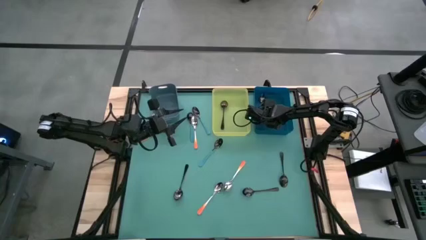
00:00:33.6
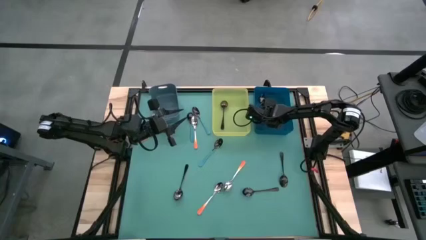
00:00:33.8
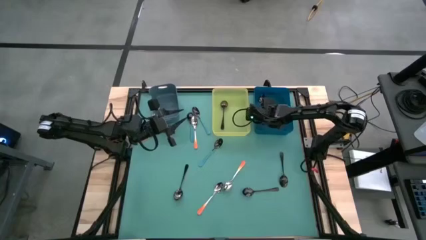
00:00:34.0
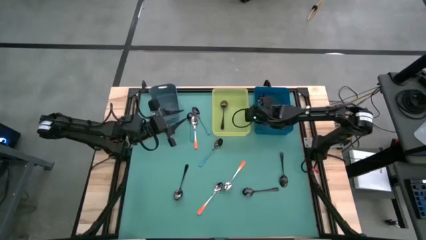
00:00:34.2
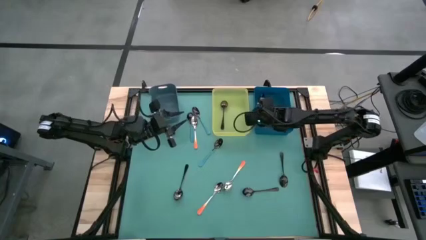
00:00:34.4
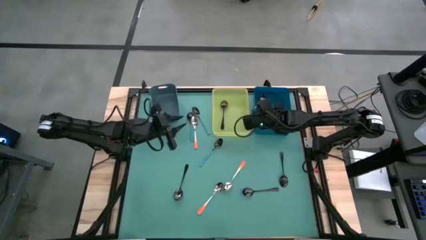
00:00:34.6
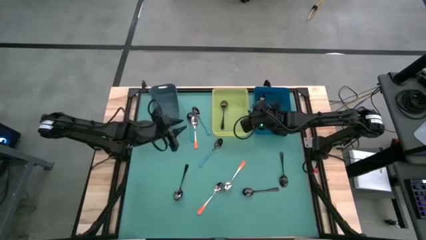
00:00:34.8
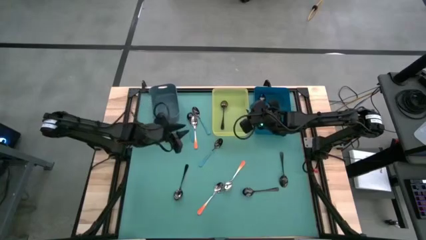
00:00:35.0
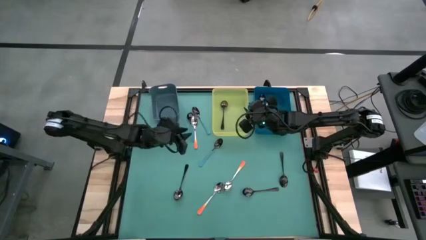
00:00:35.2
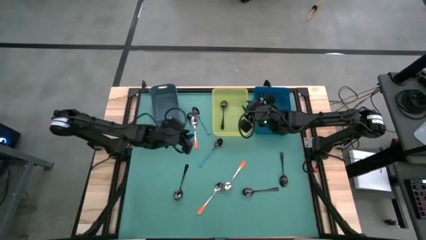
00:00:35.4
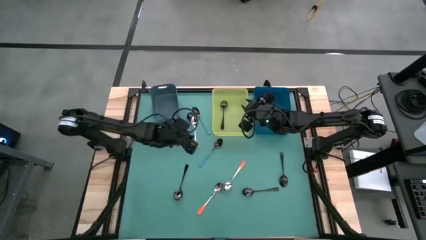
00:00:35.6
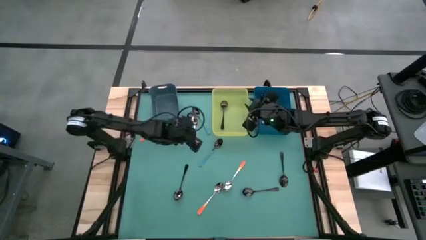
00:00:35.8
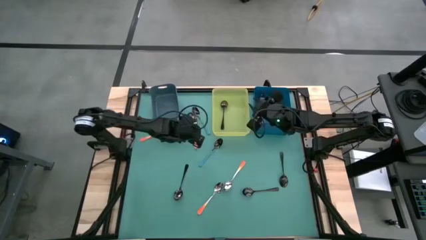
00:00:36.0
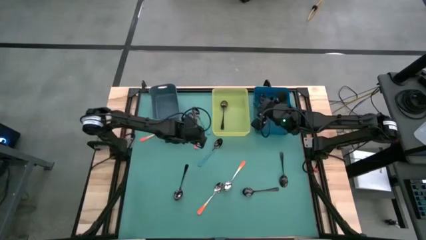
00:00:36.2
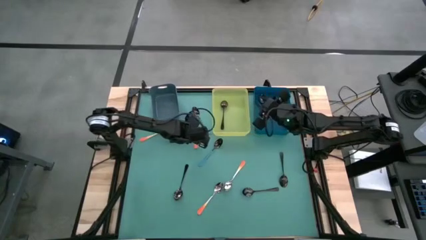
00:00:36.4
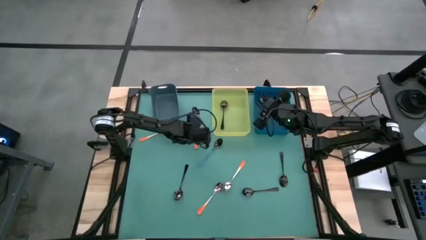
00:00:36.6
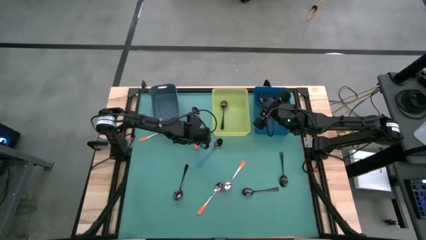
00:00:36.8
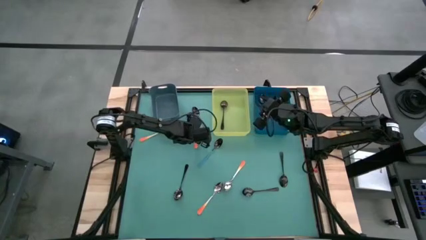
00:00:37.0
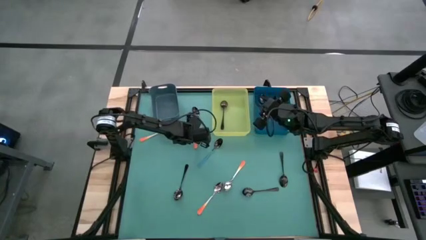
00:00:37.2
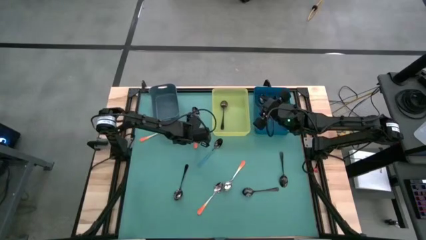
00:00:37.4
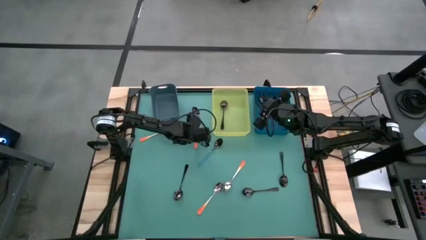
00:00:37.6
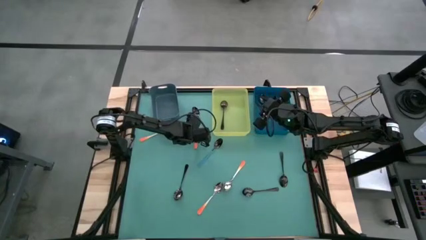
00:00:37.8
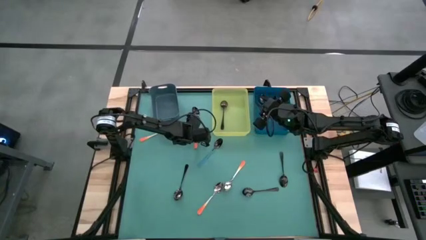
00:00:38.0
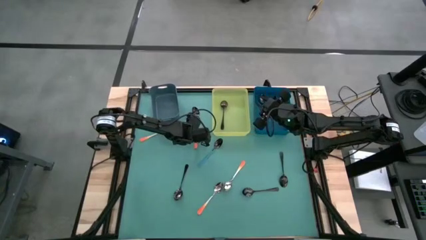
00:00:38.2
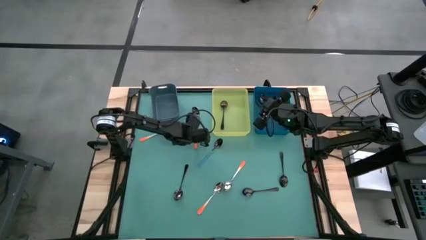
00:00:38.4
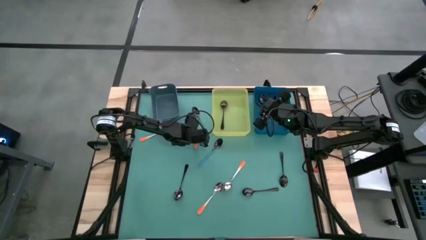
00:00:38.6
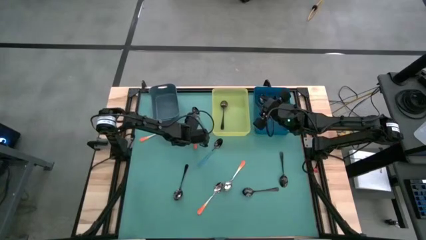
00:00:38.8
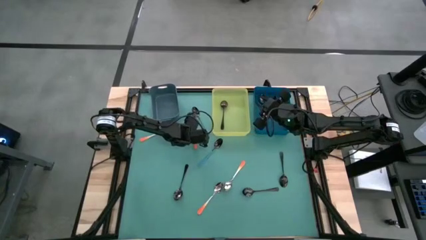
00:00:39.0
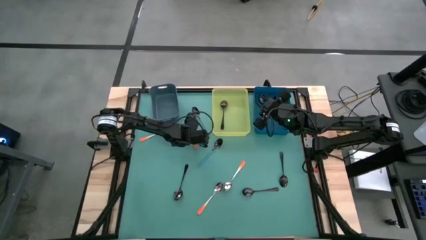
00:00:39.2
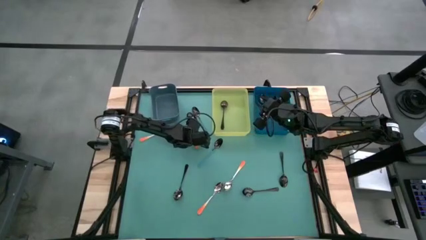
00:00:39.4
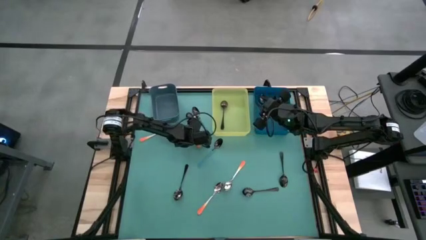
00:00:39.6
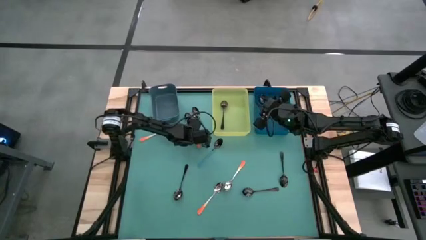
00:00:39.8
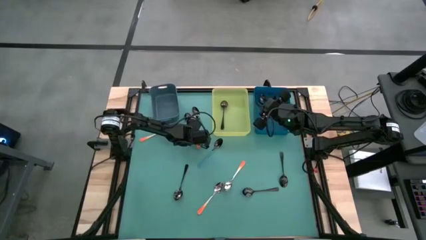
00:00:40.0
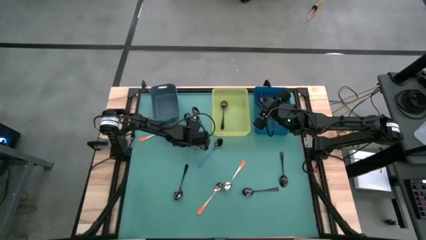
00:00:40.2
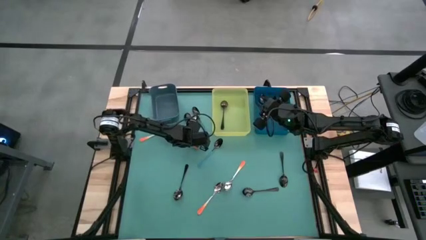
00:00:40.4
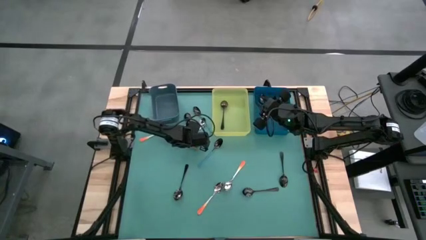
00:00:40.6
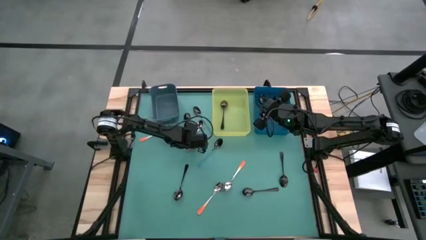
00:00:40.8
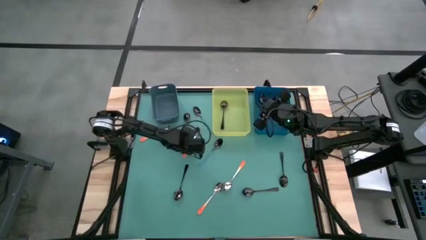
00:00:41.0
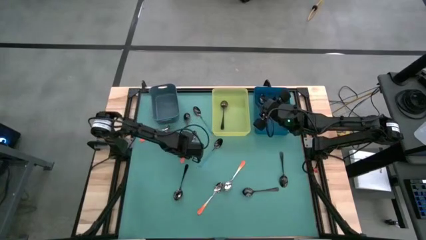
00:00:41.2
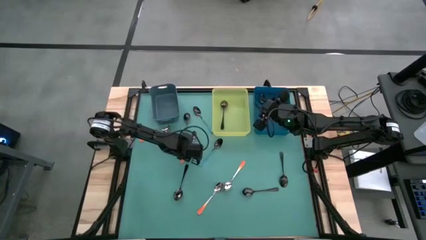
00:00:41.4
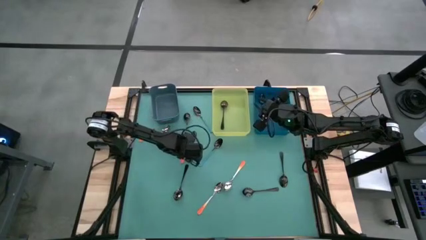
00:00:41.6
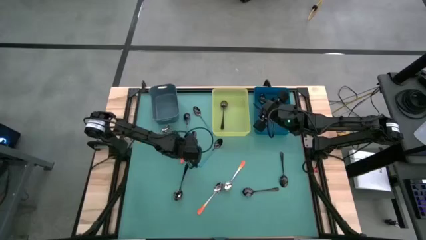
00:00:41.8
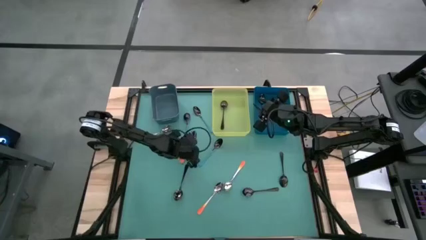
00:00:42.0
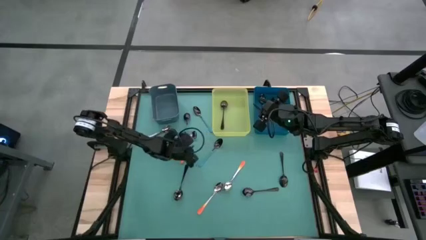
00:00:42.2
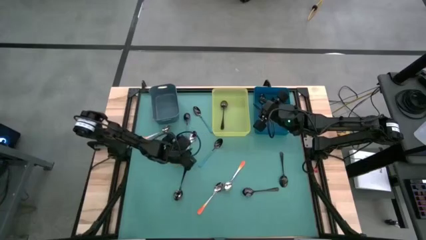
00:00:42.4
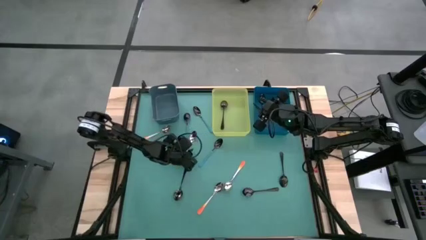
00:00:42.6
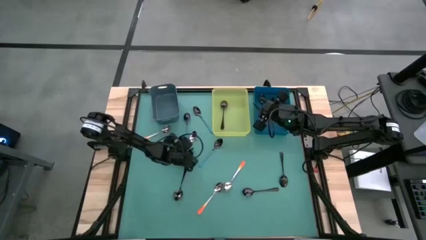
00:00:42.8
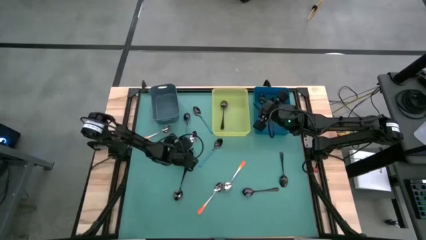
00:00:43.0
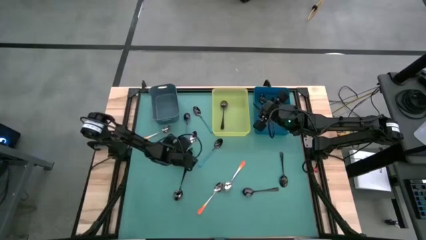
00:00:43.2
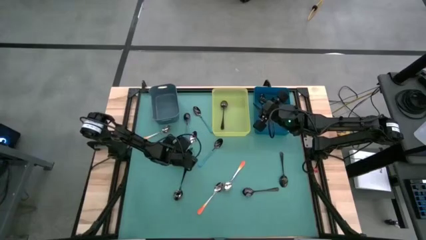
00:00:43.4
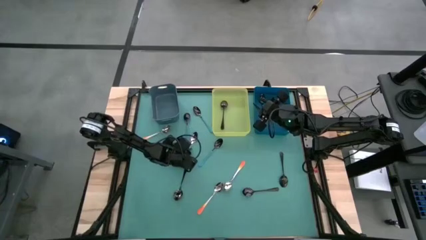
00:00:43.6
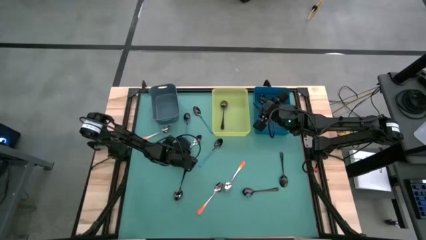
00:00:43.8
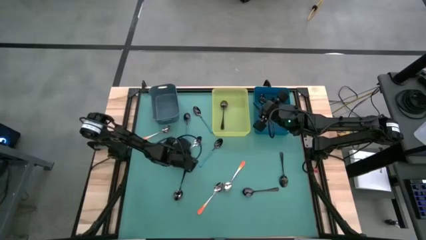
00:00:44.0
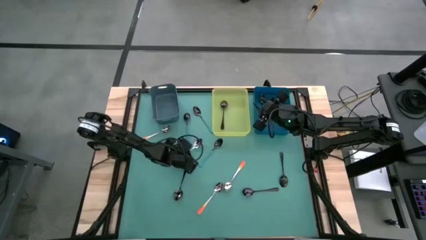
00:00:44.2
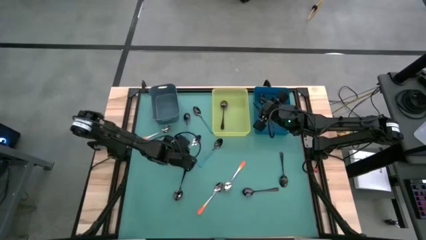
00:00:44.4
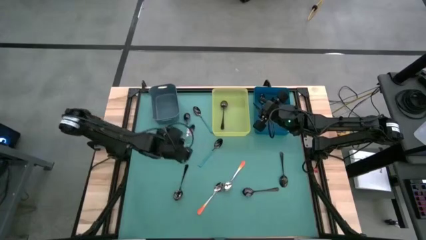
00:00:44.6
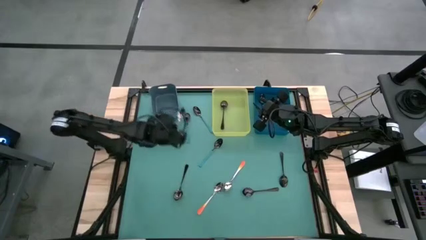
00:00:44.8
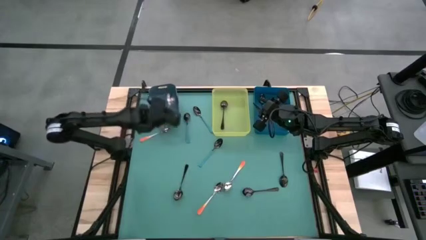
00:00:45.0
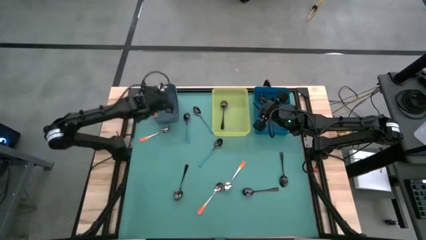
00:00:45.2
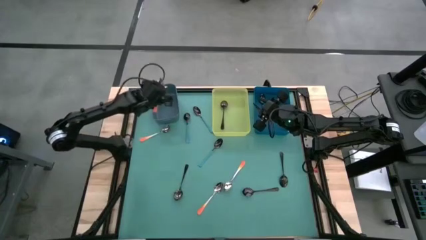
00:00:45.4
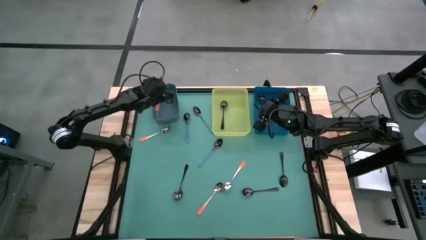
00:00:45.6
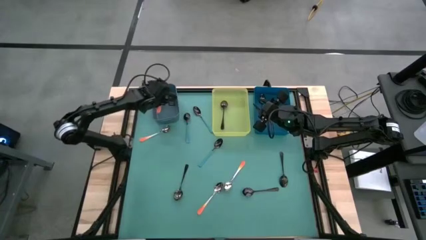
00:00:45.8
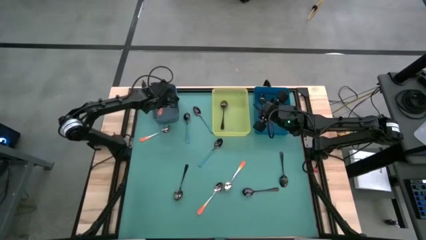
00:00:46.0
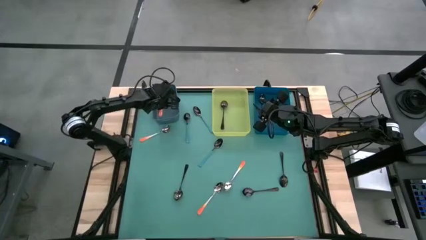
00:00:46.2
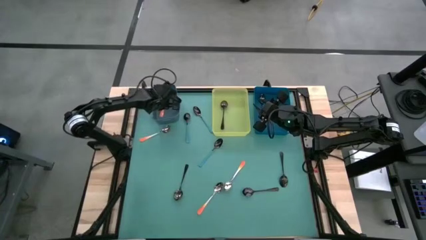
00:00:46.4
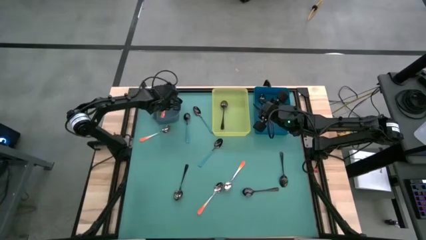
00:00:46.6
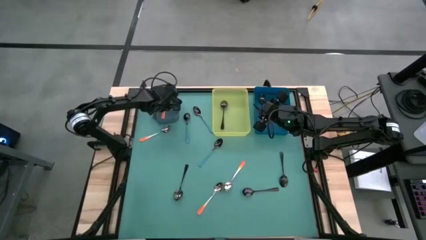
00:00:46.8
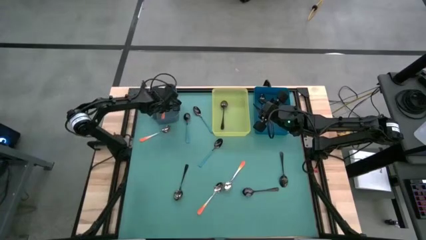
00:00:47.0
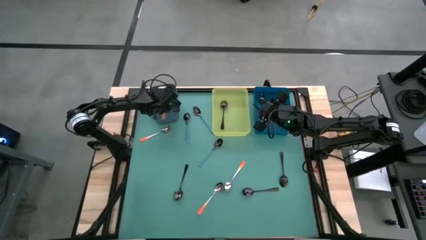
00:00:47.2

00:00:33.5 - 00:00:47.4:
Task: Sort silverware by color (type)
Put the orange spoon into the green bin

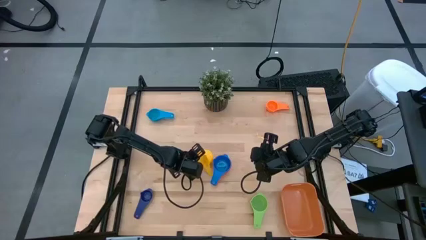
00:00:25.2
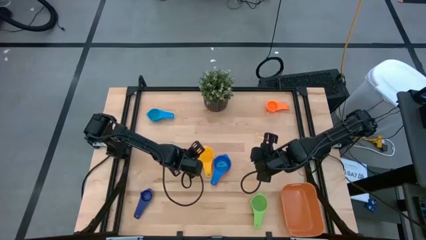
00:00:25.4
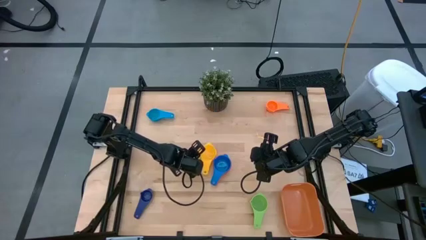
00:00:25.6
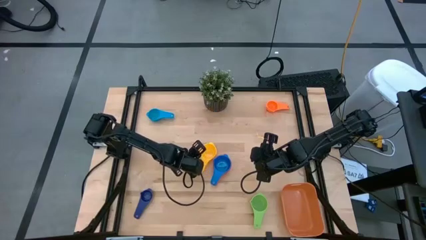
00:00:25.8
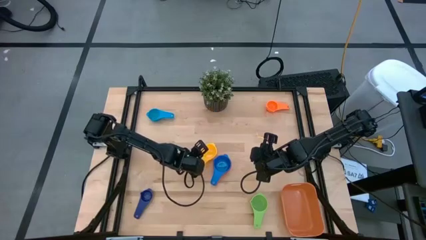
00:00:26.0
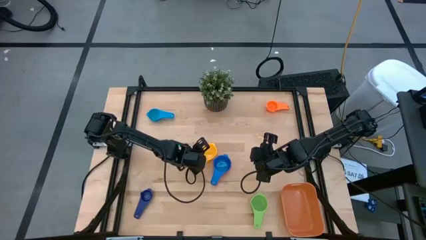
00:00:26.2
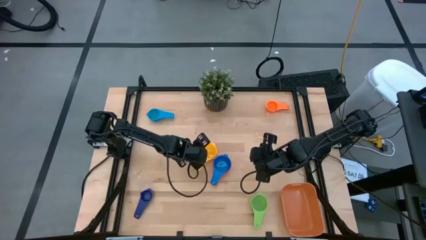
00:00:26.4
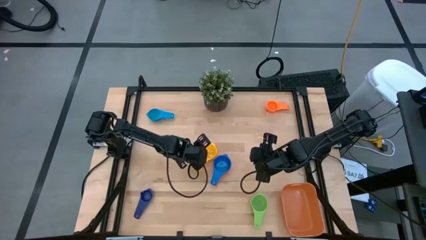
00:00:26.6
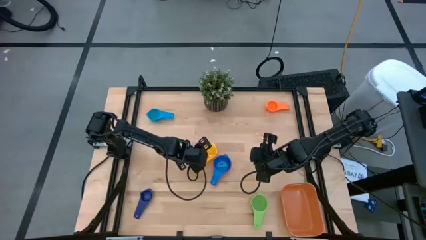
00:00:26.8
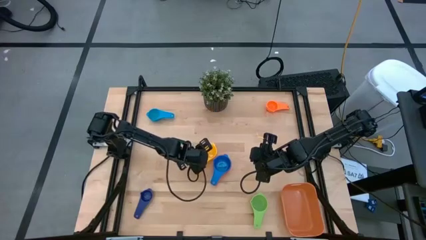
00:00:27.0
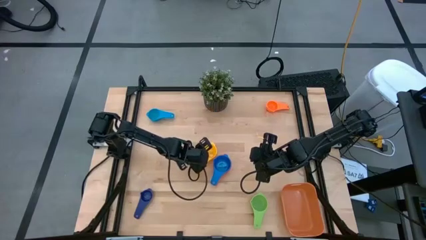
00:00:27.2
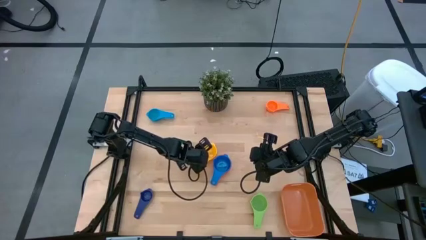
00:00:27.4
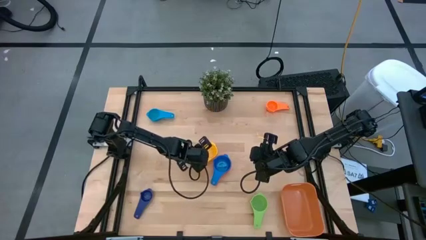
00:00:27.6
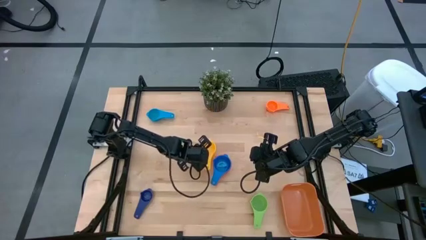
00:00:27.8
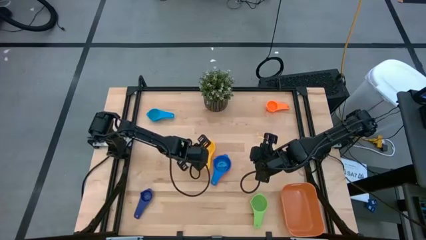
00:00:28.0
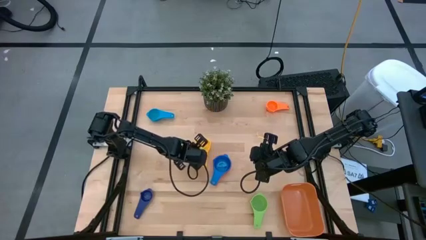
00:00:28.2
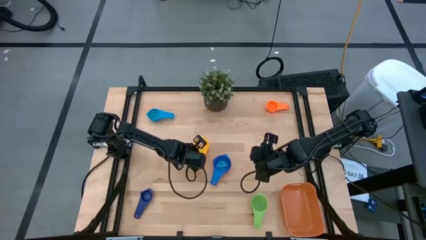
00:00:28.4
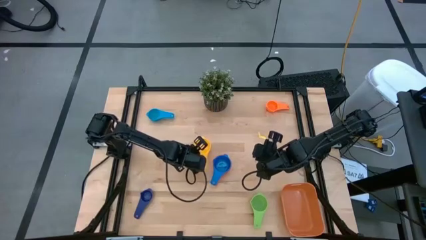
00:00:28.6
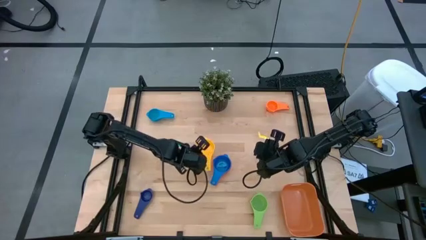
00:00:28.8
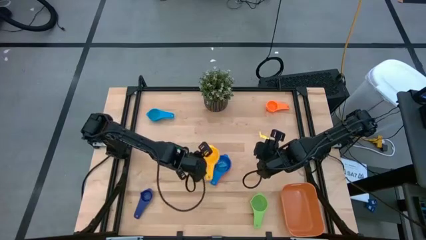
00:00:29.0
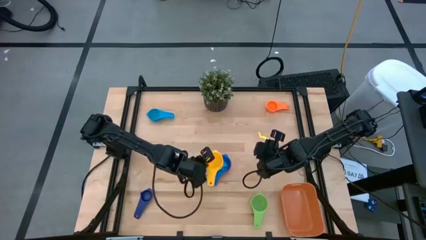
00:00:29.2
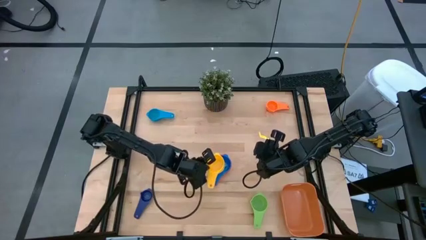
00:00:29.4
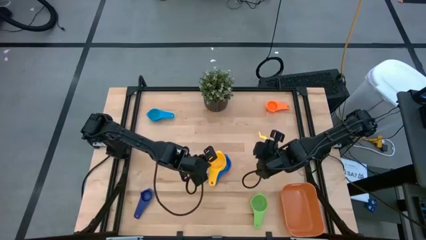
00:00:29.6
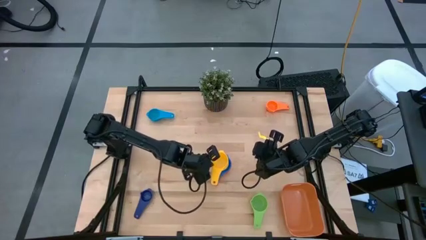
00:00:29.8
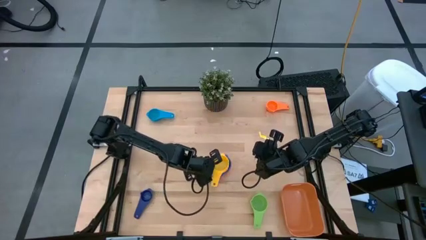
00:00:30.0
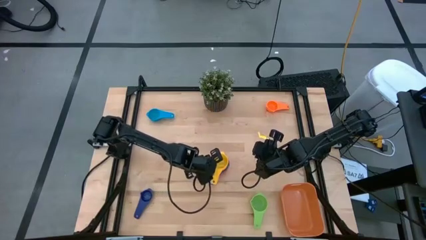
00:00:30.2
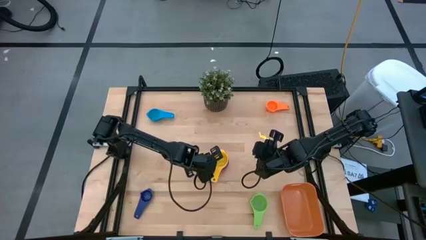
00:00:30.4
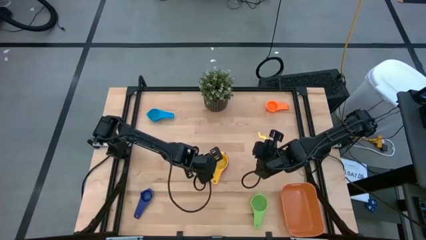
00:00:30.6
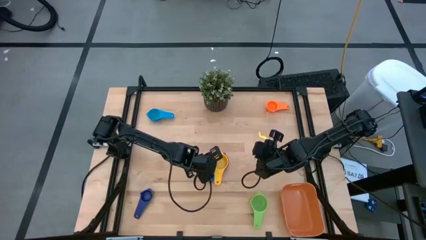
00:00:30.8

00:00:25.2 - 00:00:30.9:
Task: Nest measuring cups in basket
Stack the yellow measuring cup on top of the blue measuring cup
